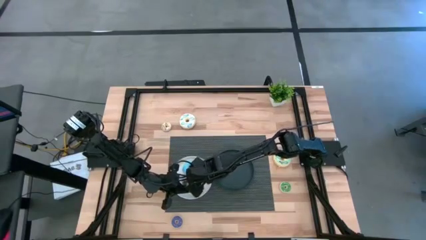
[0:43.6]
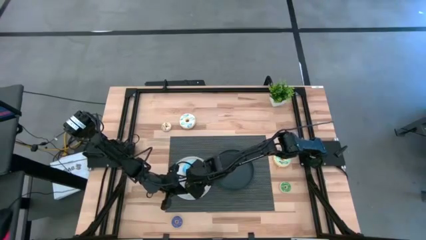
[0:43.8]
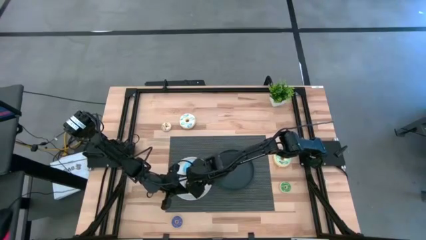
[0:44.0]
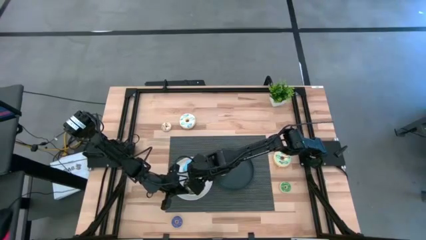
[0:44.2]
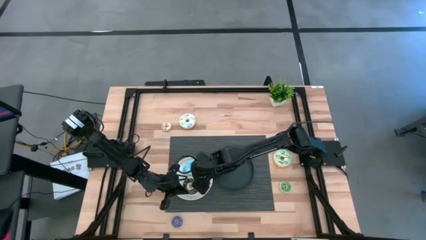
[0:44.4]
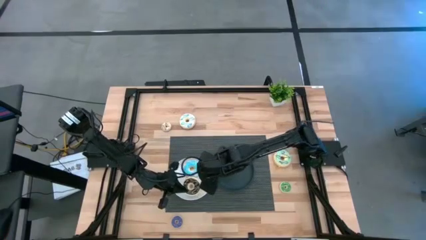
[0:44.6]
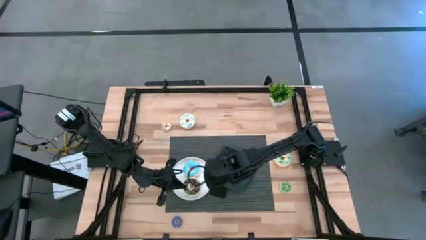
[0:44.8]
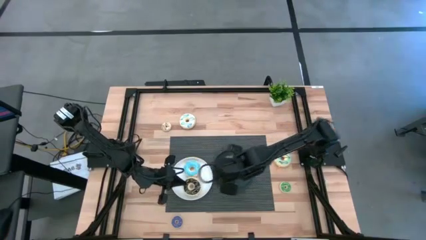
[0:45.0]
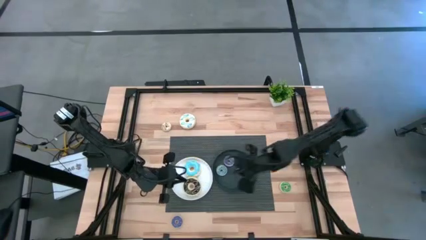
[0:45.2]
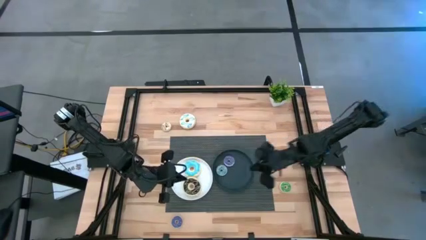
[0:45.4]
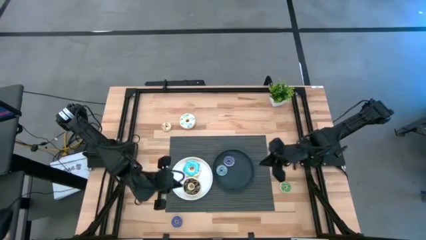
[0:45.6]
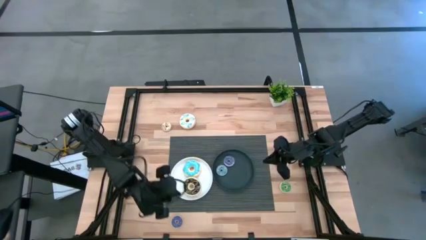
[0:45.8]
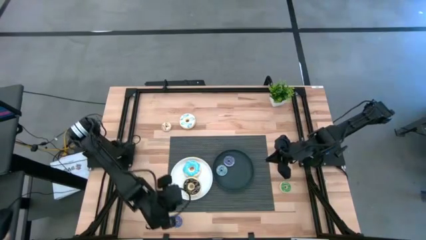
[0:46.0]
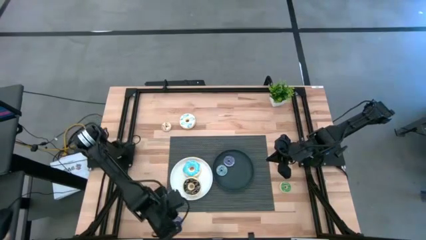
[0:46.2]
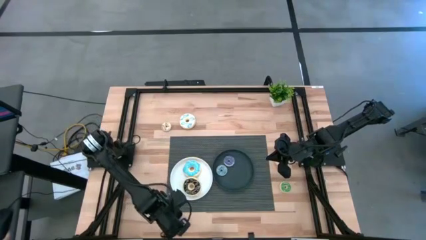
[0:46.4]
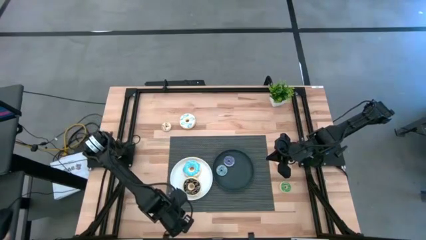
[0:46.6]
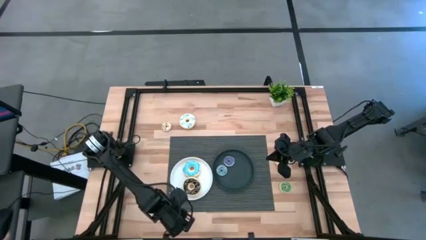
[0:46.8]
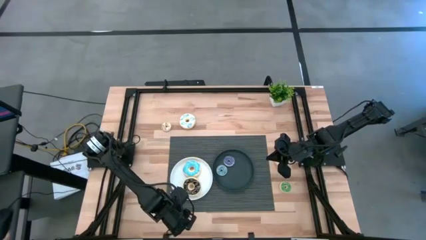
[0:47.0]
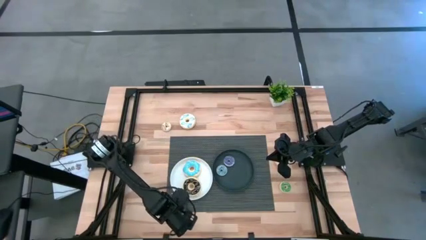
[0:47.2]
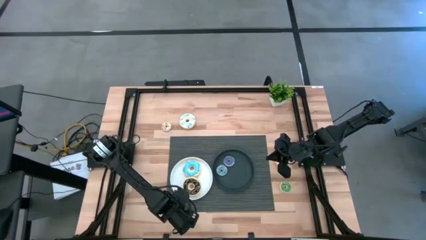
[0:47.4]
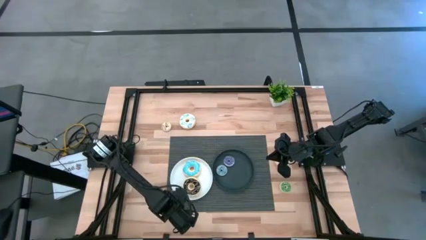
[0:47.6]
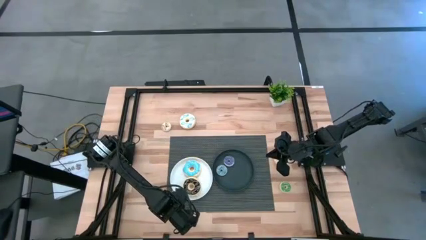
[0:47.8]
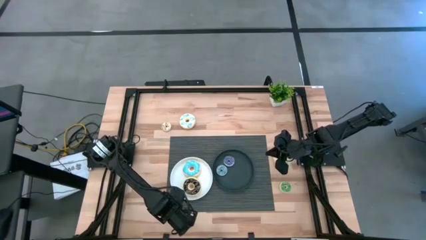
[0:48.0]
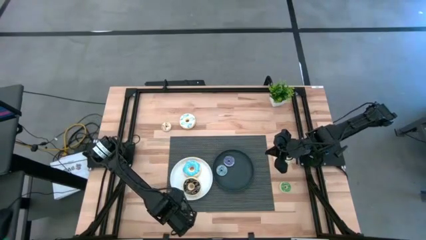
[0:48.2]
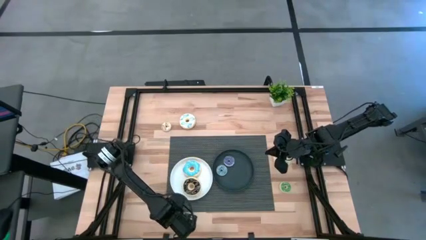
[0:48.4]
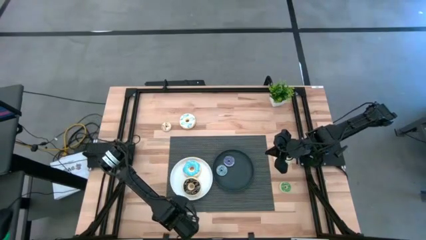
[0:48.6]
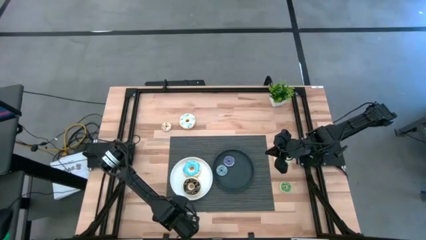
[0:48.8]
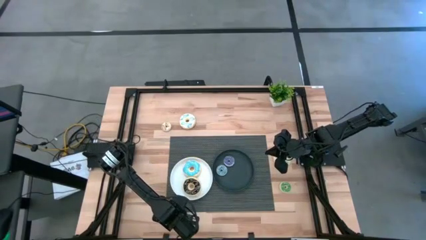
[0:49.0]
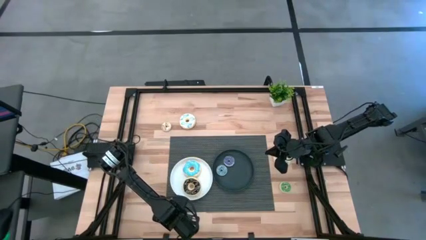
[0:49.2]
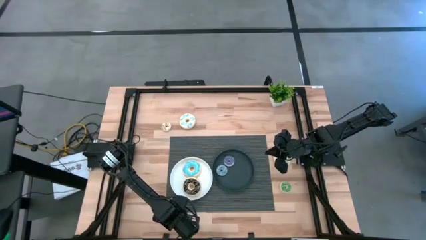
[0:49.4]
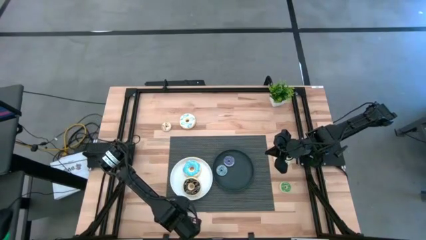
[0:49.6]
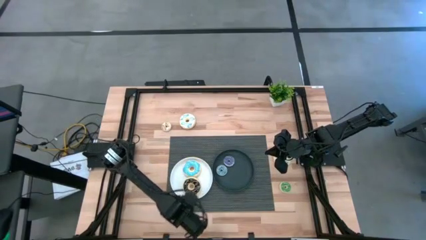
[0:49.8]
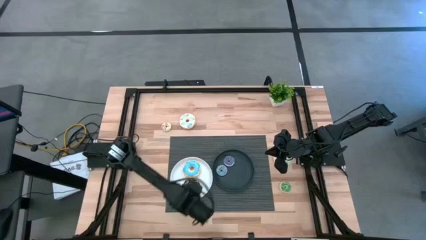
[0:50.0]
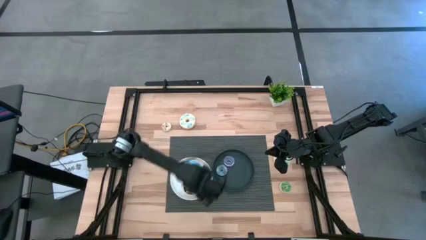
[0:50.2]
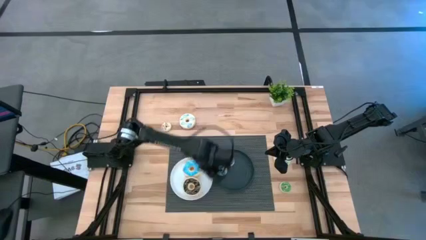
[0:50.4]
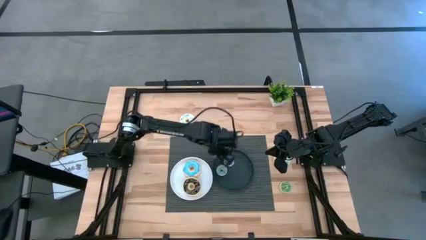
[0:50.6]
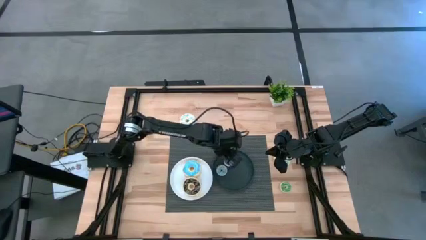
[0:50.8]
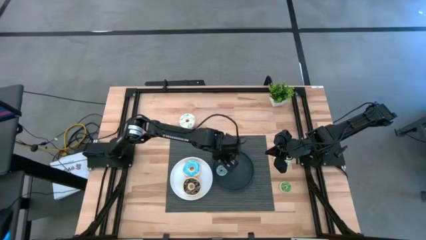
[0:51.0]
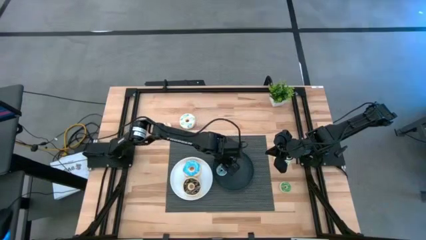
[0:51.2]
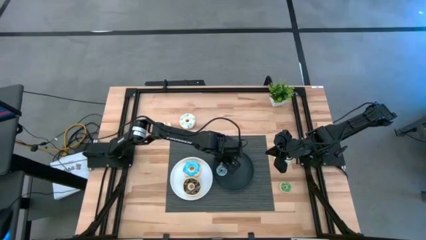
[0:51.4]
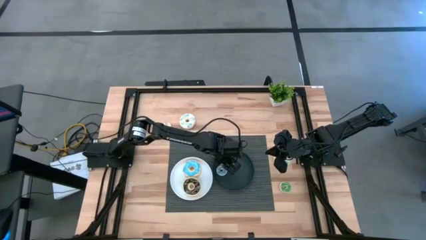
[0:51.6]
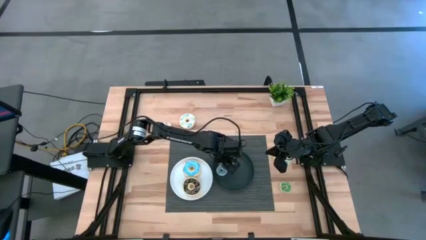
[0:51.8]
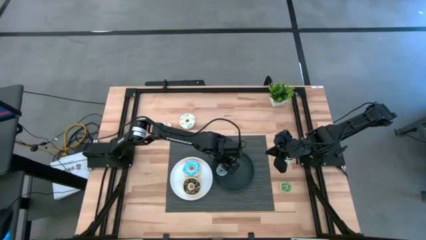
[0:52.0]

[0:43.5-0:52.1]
Task: Pick & Place donuts
Put the small purple donut on the black plate

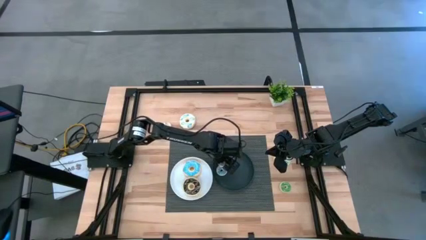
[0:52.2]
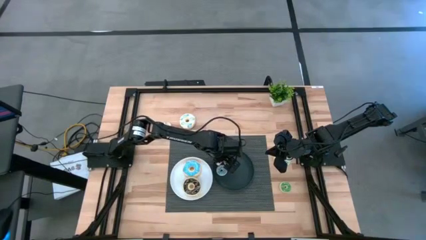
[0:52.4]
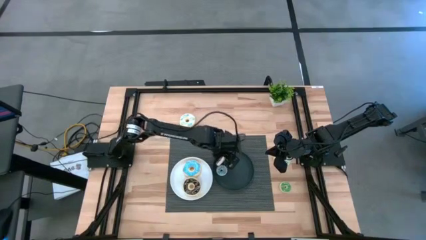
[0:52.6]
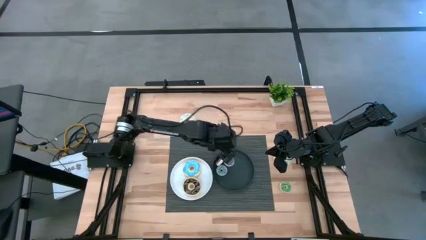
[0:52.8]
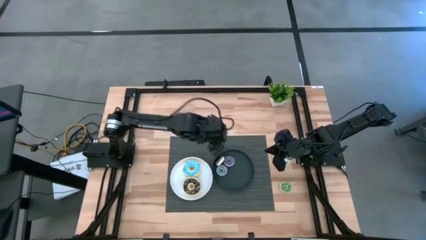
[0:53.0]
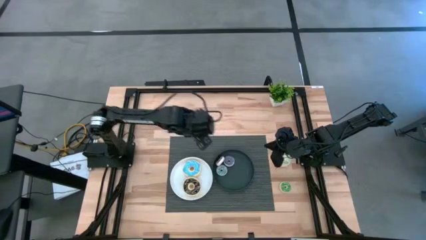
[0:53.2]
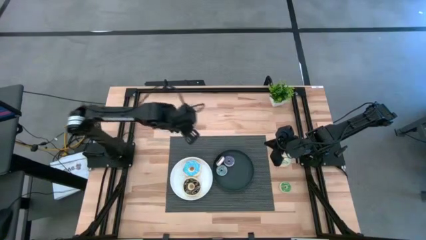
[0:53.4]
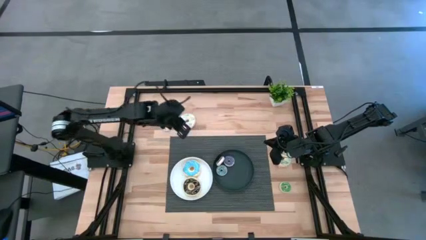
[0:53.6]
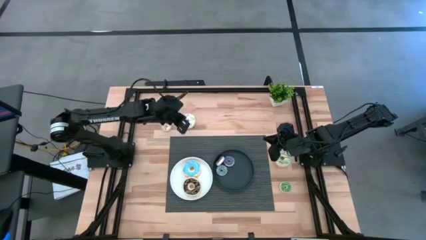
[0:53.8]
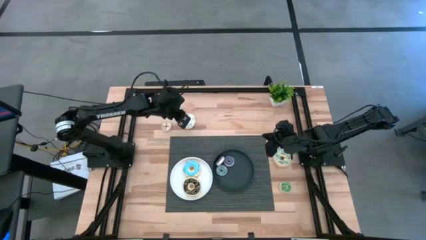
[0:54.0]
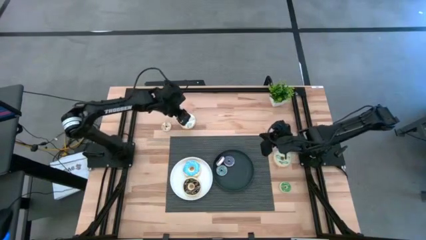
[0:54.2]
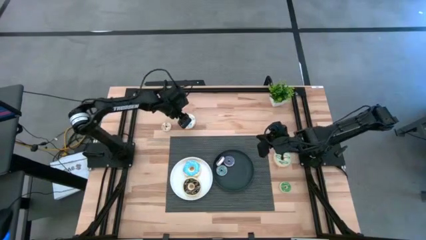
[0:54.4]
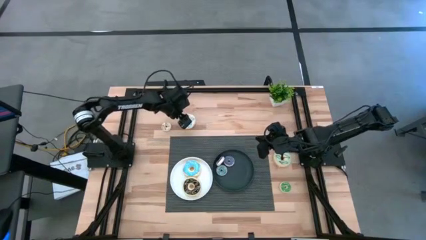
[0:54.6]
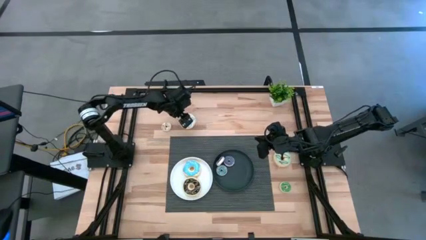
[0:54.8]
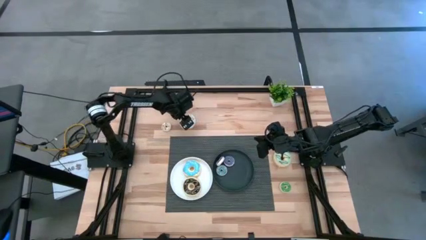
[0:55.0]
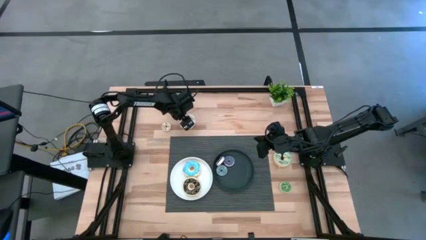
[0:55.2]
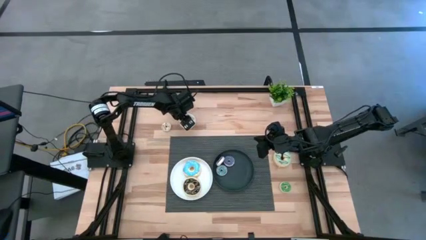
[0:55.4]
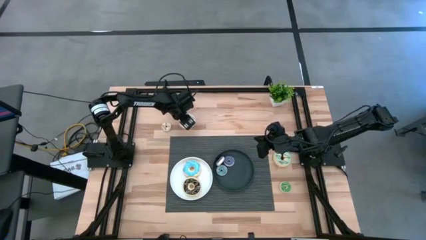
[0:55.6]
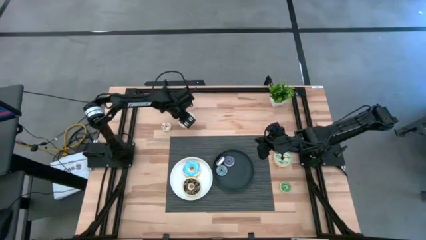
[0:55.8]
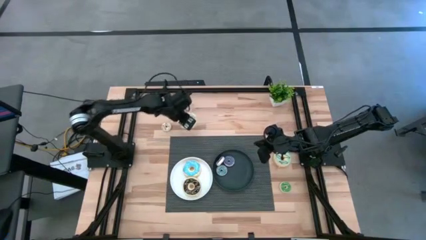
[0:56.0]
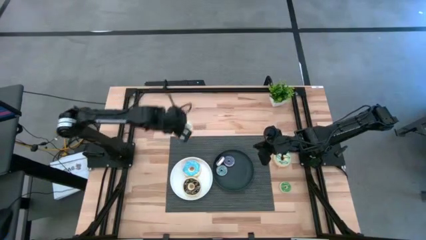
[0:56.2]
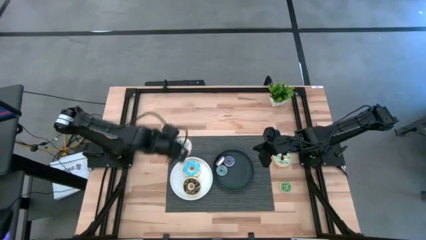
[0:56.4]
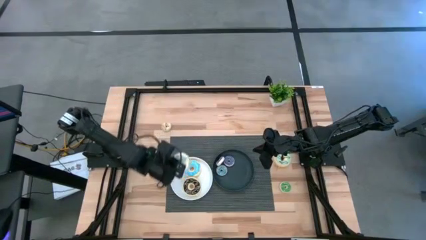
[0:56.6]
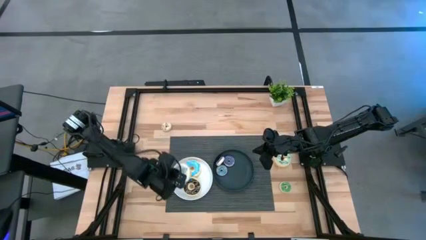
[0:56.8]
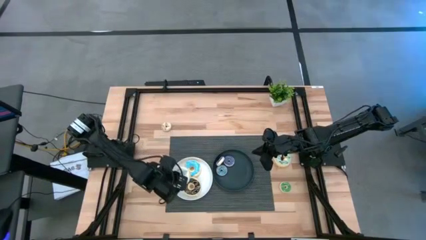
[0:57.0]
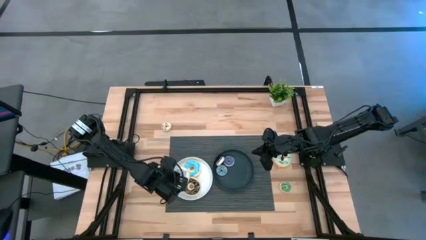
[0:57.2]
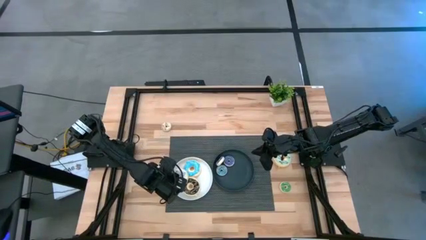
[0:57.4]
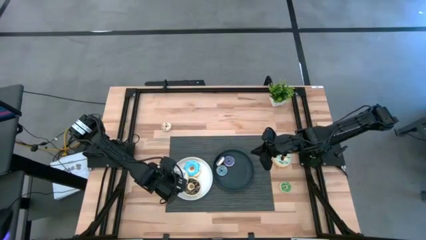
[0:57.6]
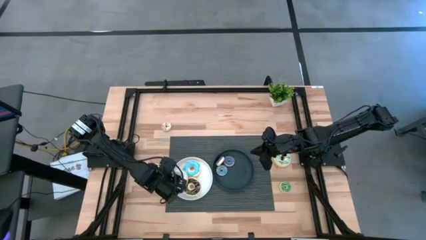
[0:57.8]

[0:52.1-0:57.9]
Put the big white donut on the white plate
